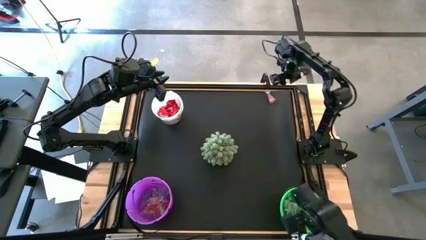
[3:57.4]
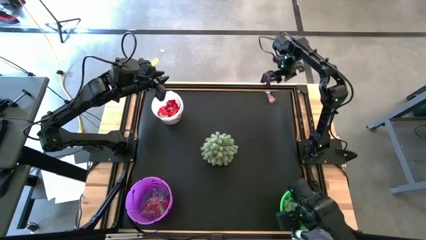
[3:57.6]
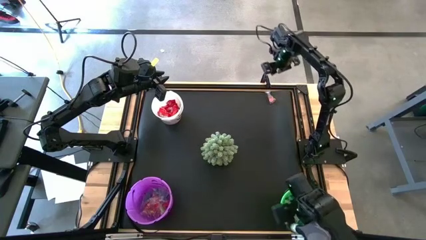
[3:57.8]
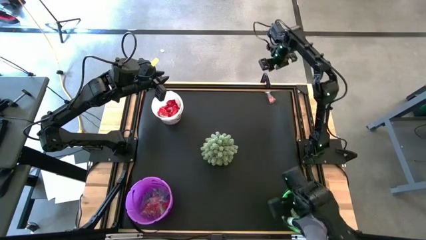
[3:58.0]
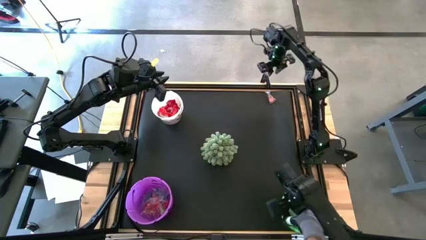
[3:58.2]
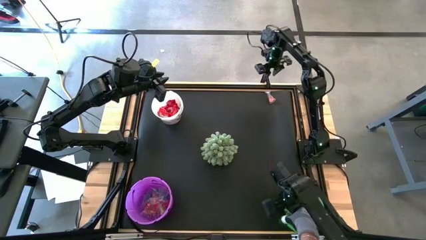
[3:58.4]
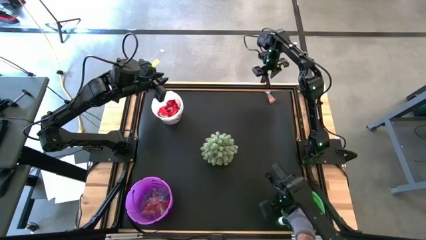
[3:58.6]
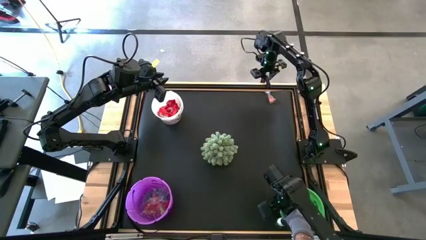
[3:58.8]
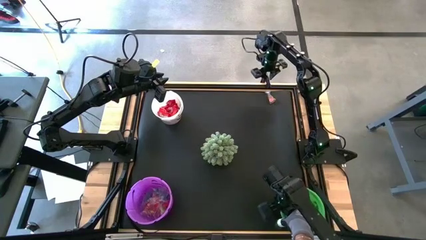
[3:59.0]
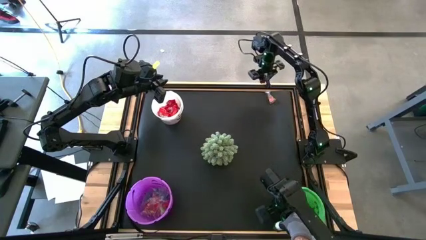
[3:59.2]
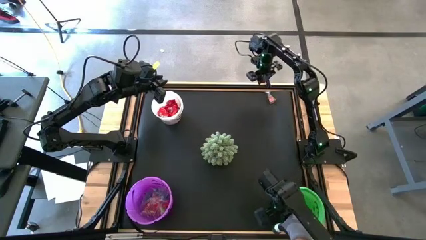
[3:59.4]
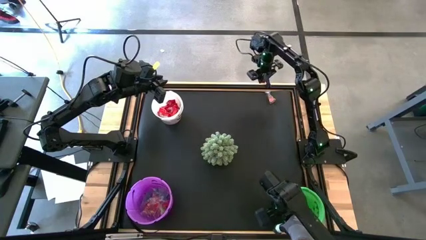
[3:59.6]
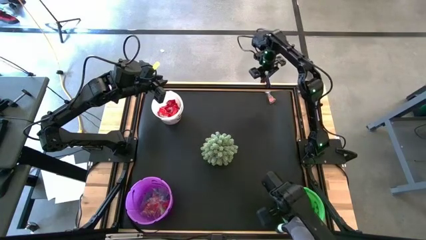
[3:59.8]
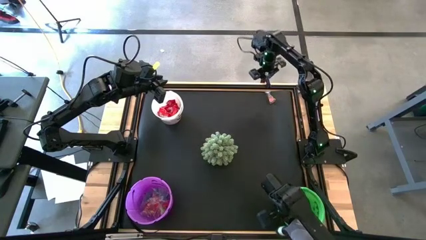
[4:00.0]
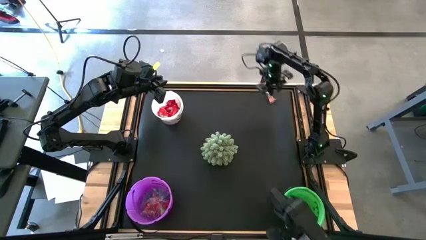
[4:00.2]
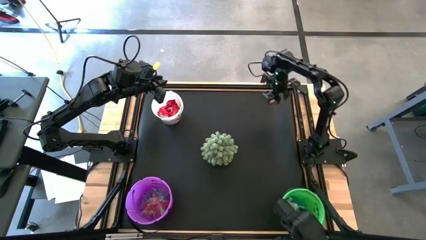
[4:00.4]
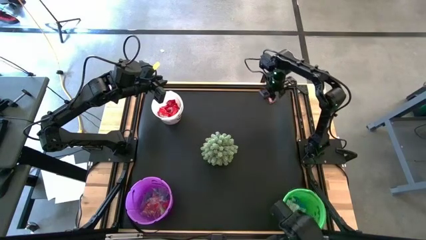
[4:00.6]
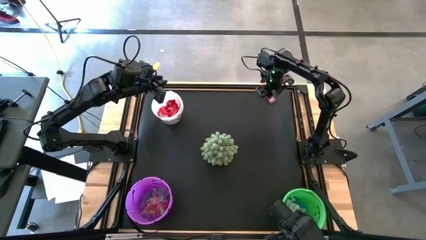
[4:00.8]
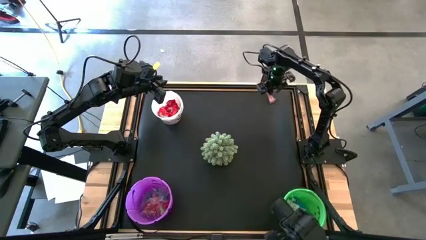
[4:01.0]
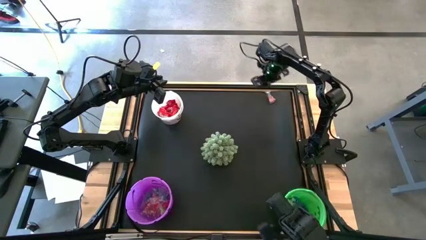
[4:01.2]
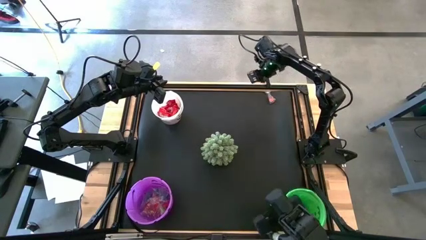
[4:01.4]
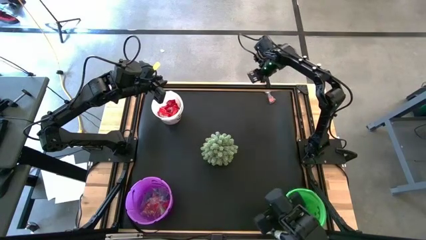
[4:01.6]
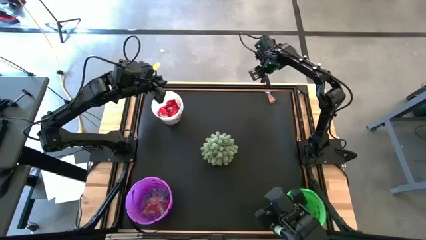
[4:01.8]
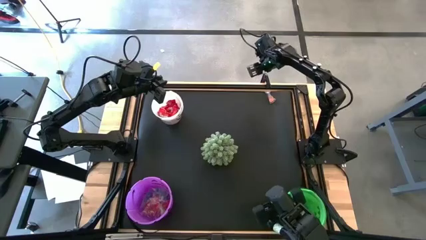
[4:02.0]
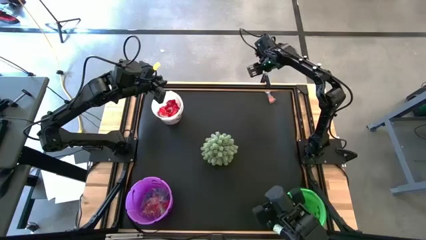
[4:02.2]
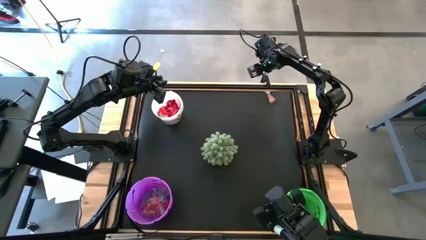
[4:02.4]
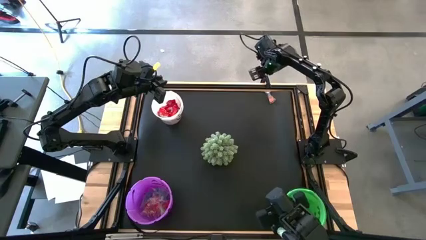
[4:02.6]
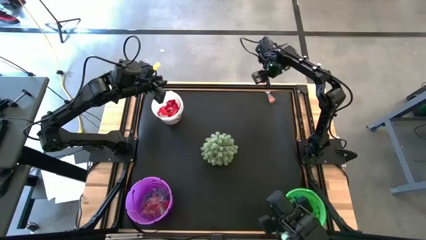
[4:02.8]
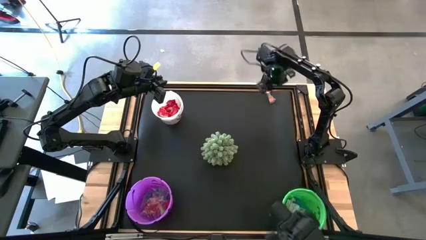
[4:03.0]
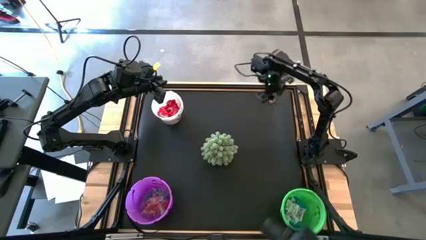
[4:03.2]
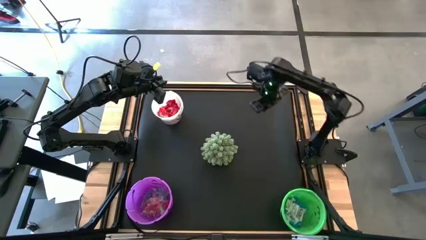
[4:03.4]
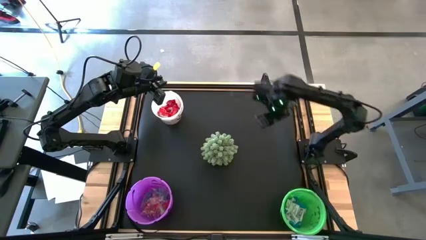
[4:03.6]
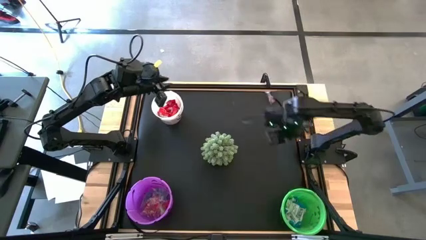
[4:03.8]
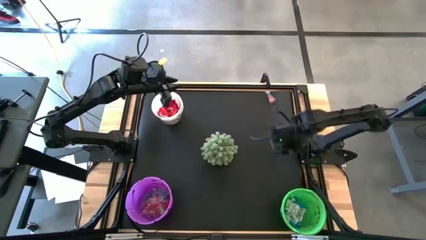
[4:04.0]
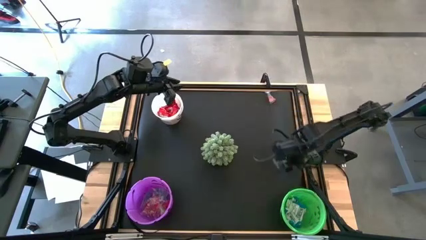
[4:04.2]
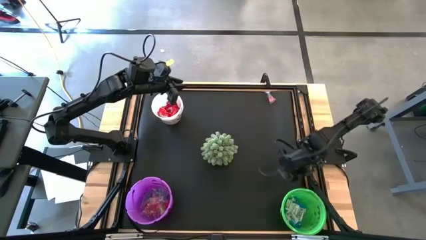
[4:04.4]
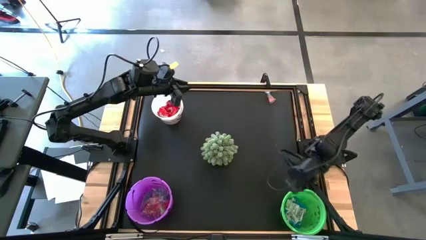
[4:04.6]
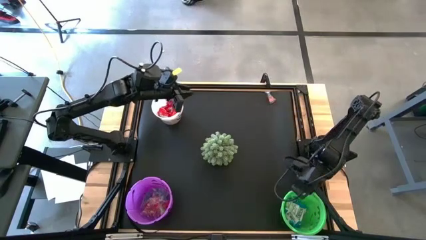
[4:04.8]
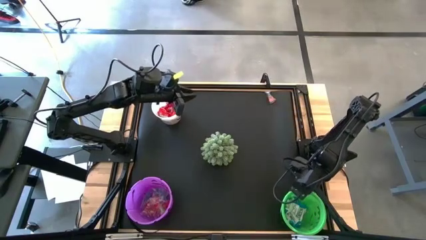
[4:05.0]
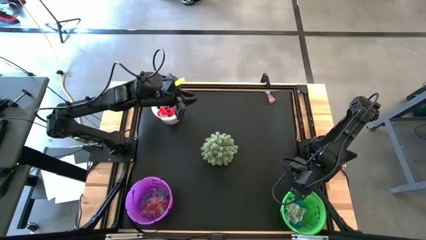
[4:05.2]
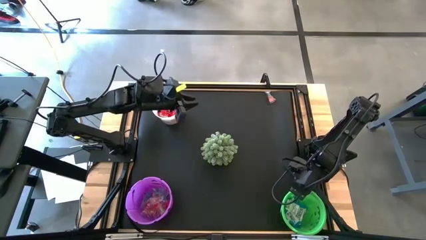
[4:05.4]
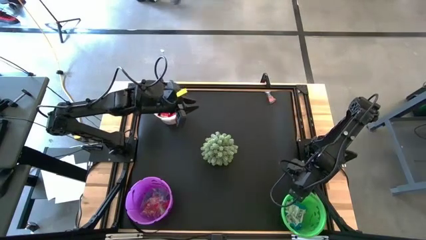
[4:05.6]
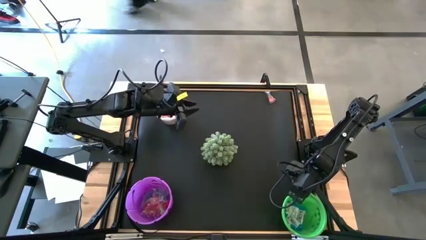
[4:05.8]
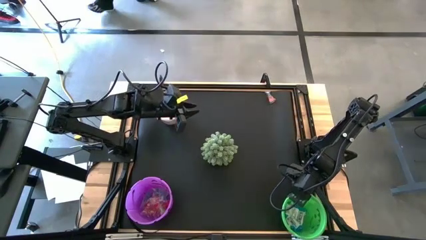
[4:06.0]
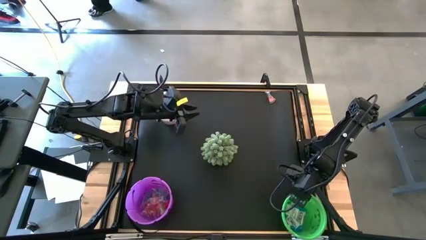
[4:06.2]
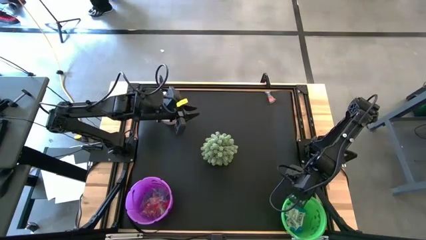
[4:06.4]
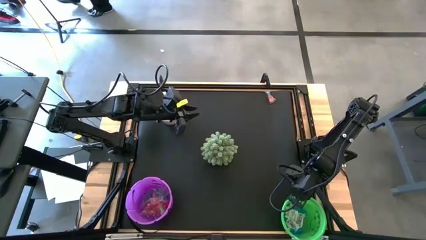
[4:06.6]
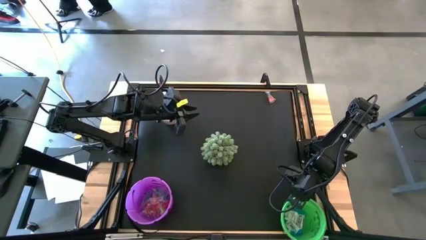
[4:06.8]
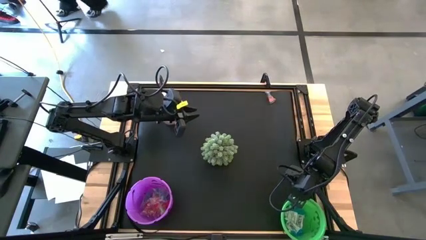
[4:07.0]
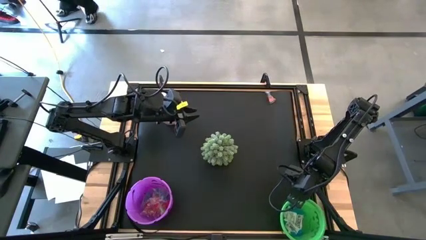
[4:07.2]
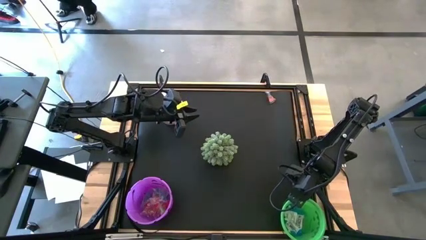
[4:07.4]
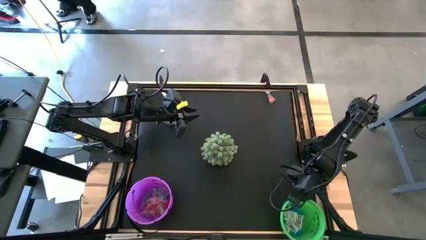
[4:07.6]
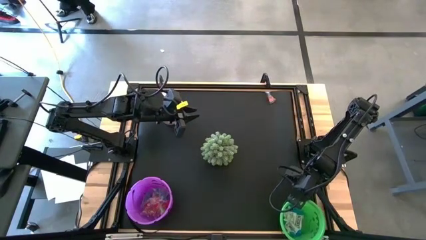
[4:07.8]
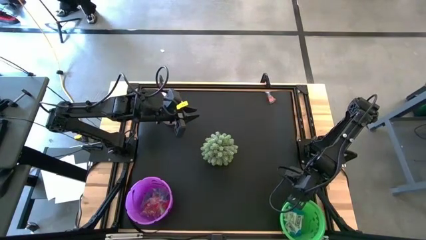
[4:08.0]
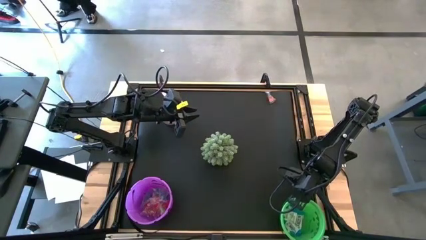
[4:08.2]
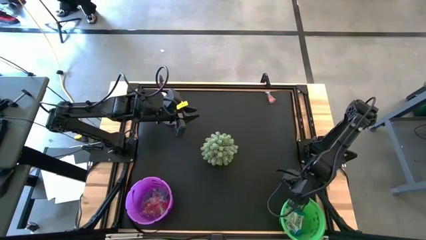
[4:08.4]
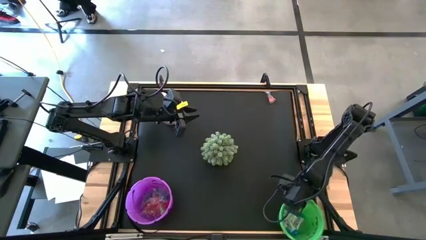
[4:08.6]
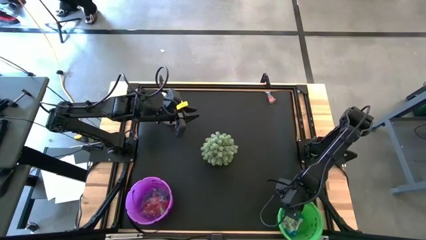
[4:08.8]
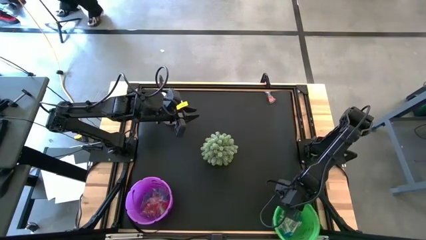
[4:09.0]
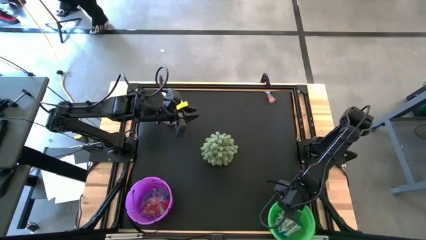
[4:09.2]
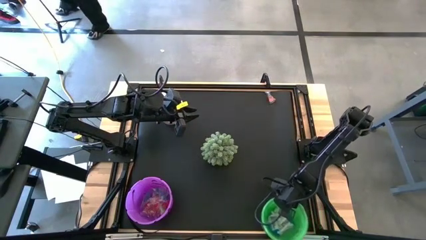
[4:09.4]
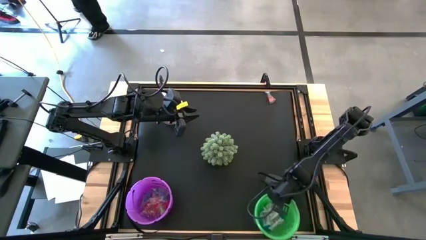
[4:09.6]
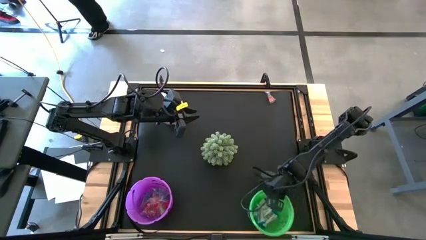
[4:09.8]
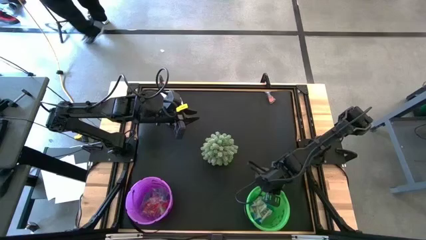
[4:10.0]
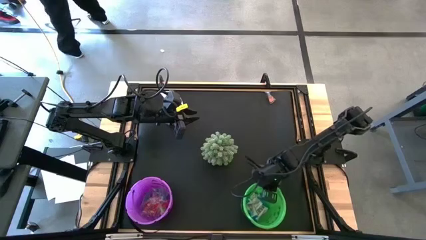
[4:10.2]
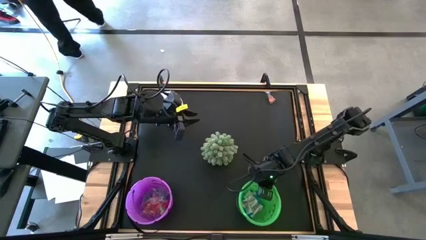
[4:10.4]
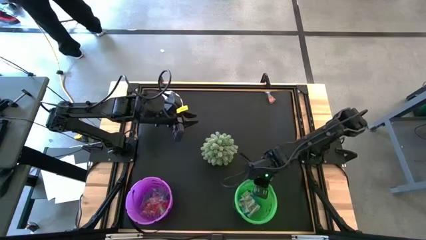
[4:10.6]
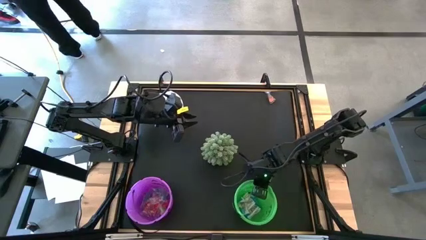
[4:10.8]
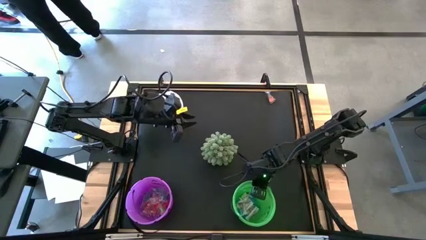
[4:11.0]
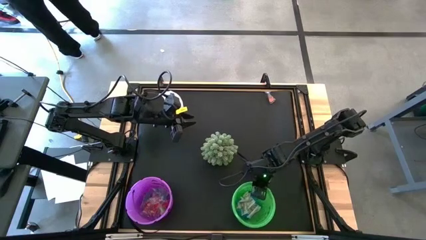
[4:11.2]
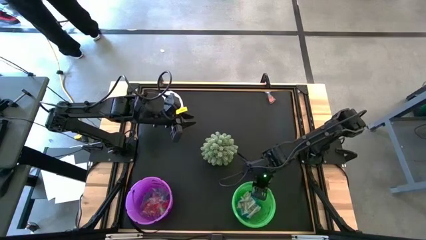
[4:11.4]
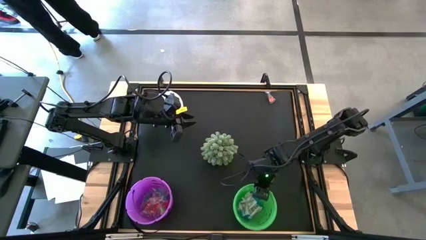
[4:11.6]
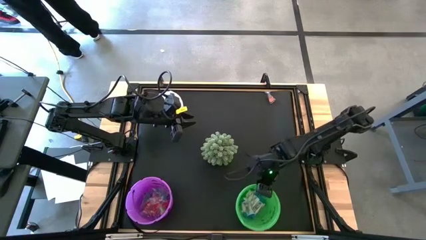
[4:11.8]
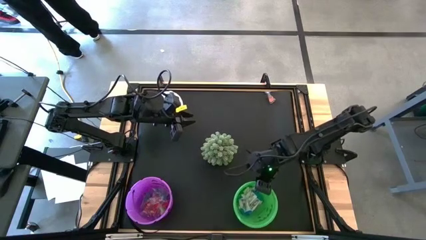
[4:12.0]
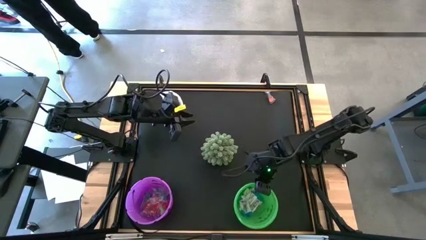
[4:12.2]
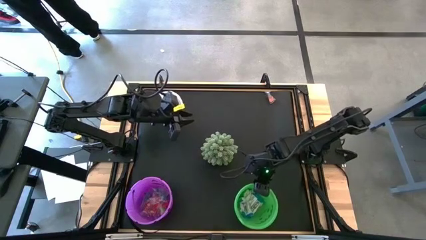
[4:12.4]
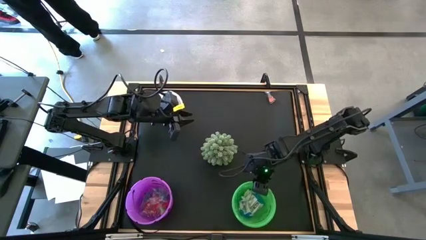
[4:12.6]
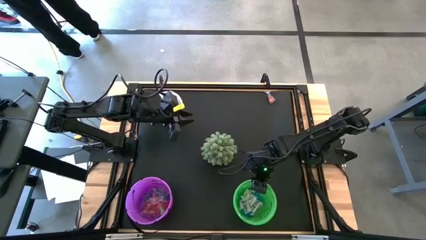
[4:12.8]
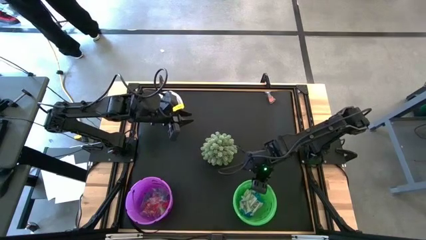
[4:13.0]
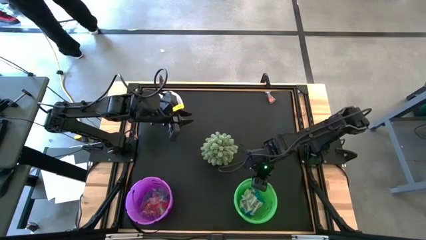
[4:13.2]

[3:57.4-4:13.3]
Task: Organize candy in baskets
Adjust the green bucket on the table
